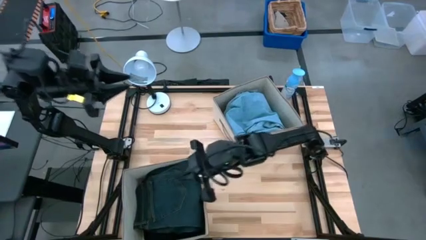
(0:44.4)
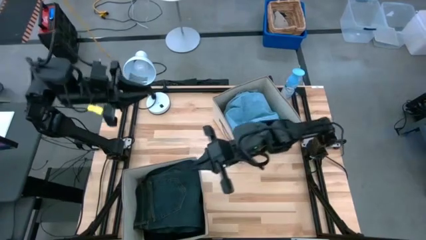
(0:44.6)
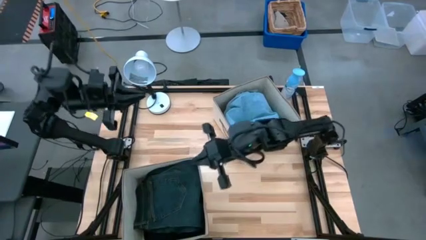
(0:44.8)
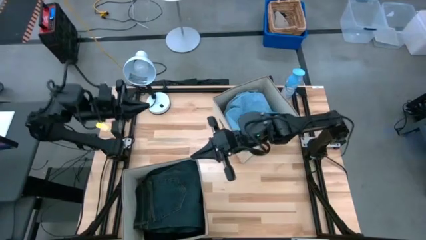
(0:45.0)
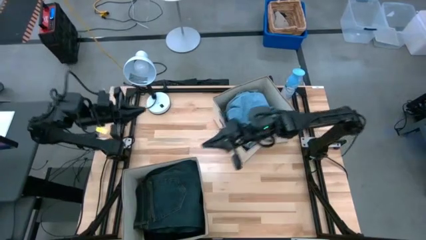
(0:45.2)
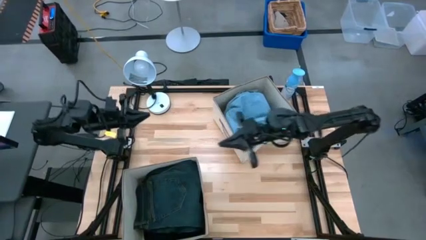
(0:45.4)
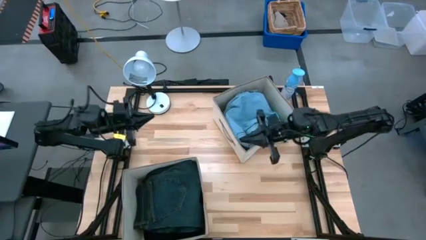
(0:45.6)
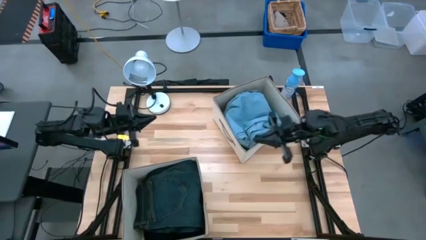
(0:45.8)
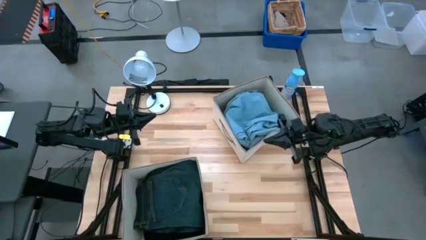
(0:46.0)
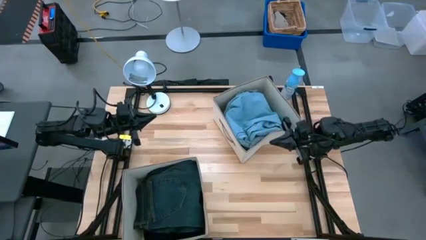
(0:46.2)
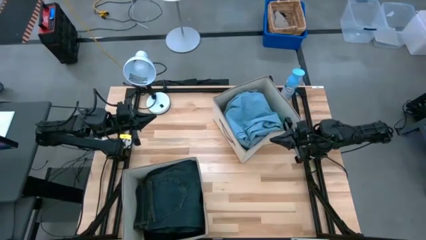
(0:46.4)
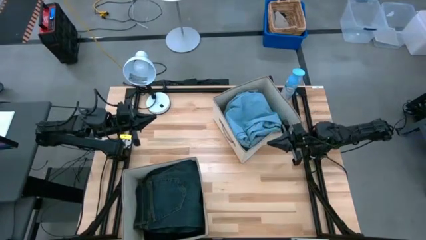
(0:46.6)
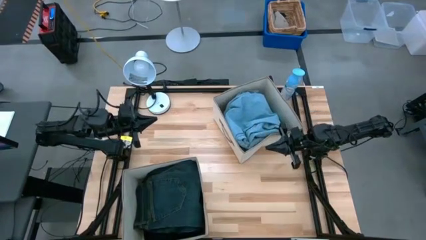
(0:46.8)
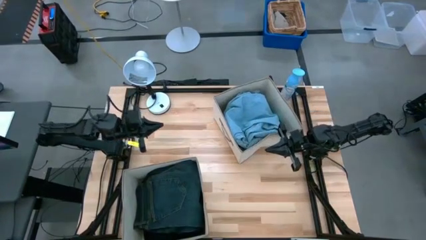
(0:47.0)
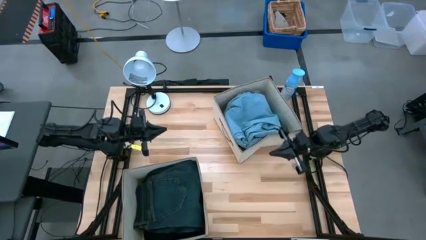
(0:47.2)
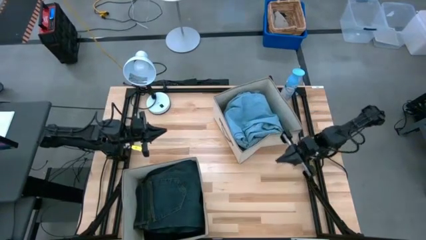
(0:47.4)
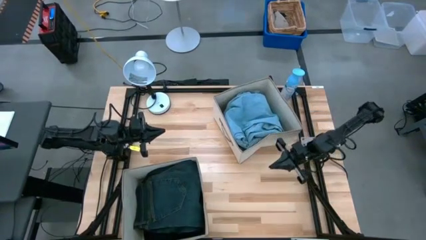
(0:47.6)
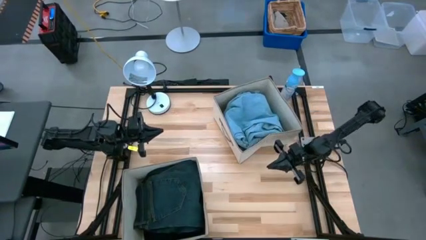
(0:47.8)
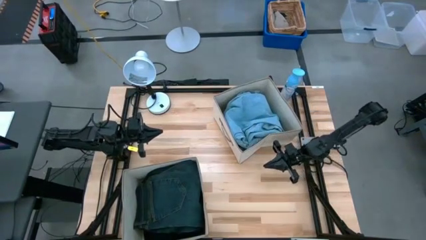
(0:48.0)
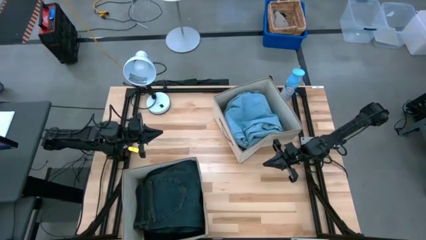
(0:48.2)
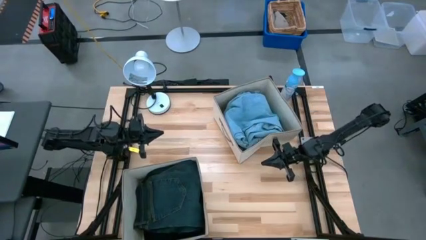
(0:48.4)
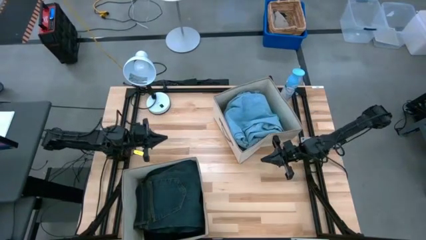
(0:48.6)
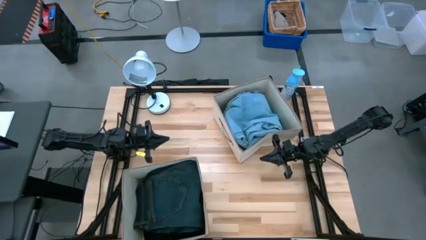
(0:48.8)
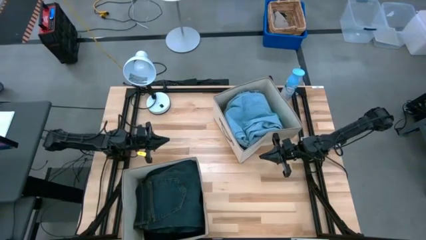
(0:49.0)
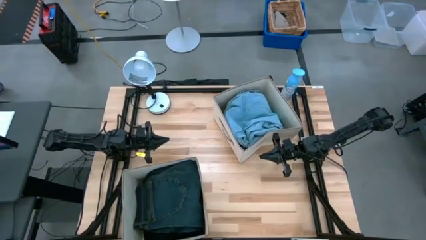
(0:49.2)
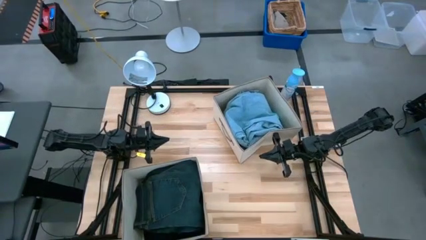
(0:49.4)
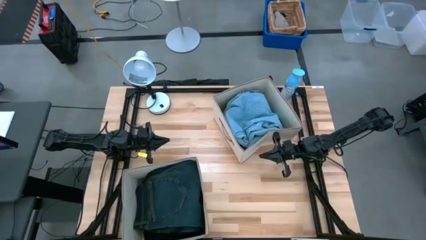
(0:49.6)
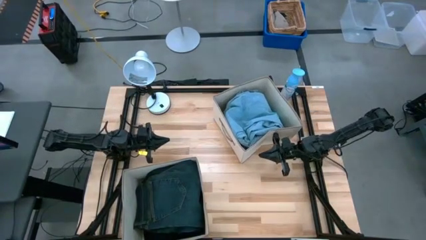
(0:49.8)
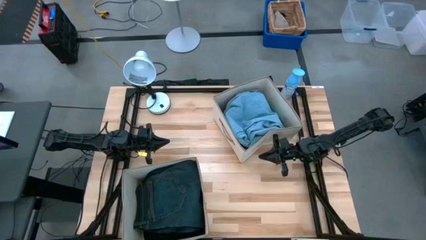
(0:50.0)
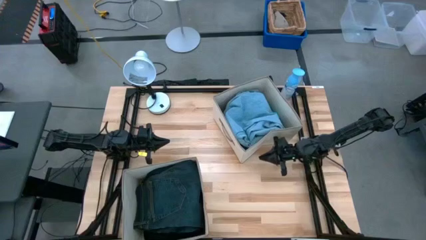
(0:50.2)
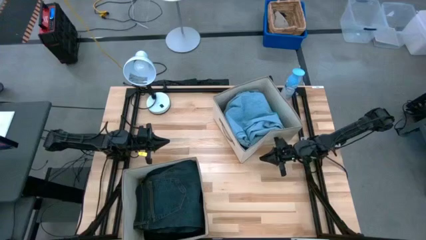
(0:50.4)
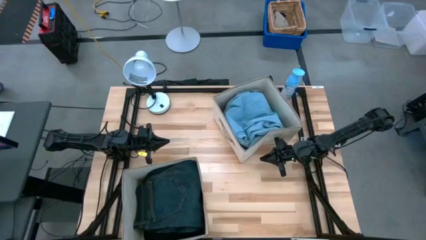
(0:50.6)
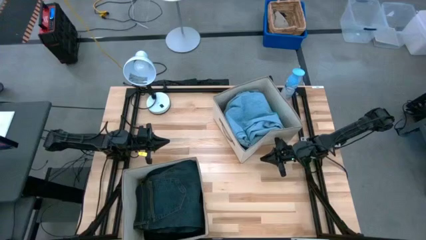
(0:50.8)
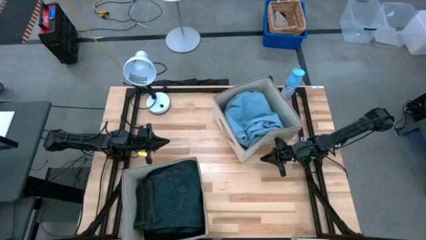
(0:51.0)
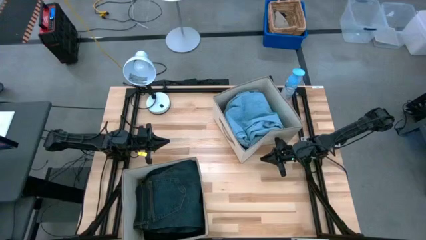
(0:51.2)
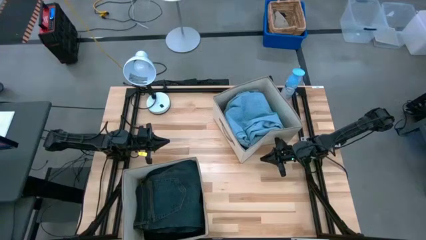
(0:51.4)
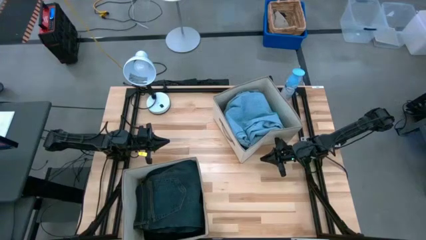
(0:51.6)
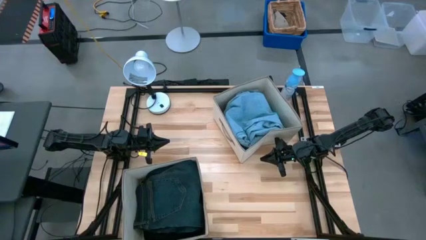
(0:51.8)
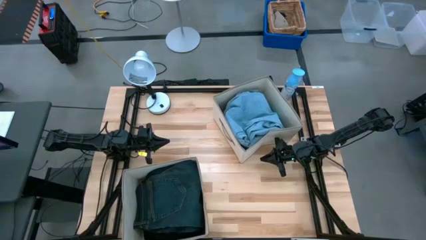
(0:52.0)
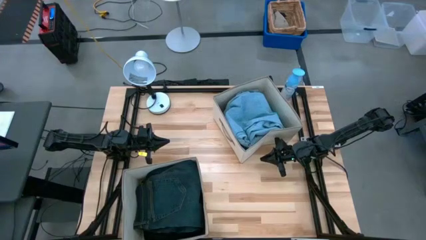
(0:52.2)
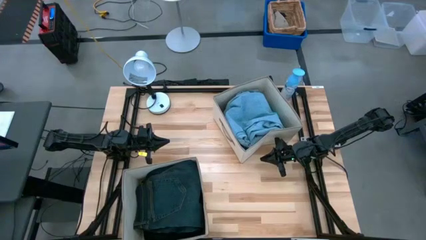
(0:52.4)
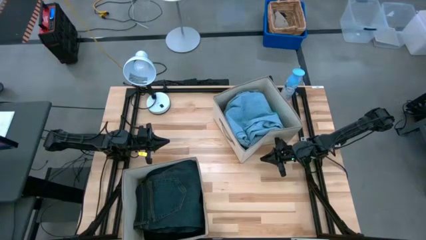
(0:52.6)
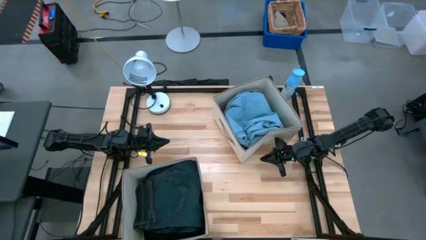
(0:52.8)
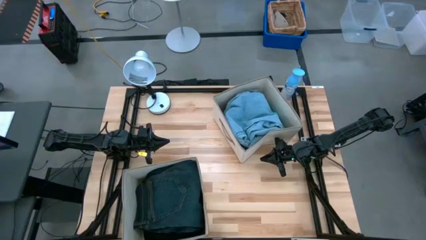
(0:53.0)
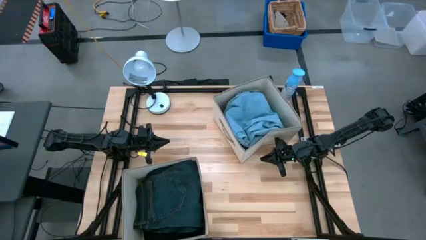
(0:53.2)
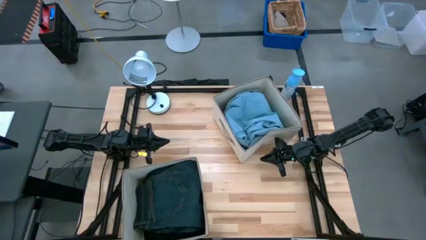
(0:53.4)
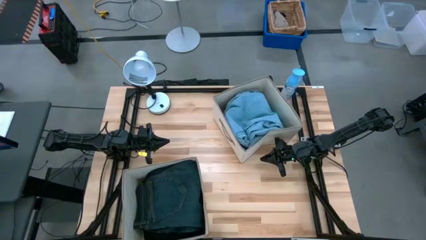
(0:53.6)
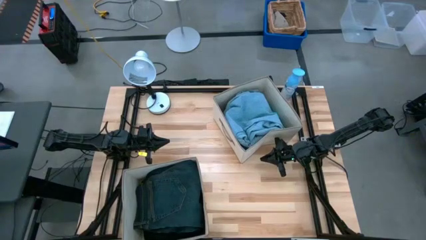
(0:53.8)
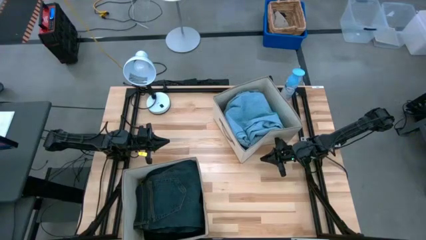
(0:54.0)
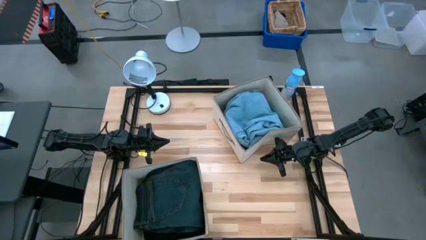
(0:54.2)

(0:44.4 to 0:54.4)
Task: Sort clothes
Return to Home Position
